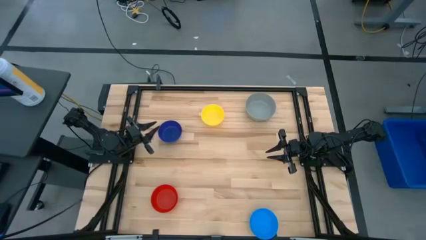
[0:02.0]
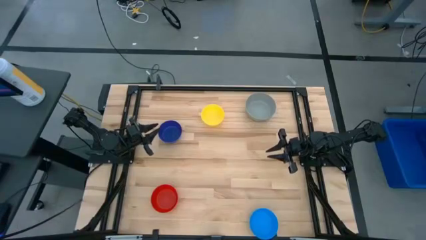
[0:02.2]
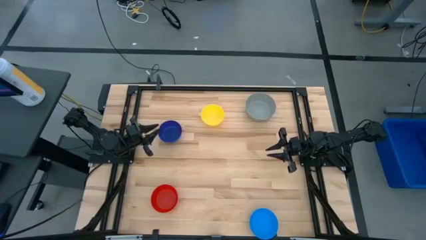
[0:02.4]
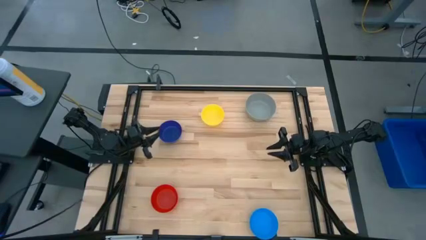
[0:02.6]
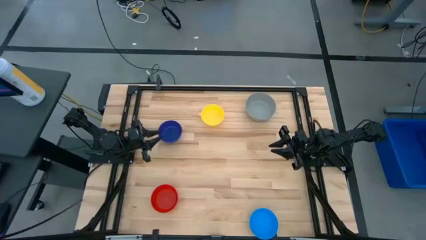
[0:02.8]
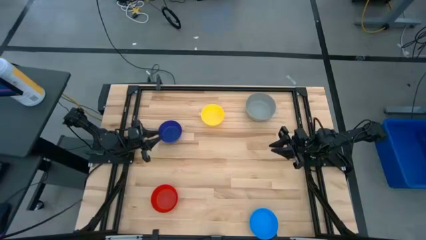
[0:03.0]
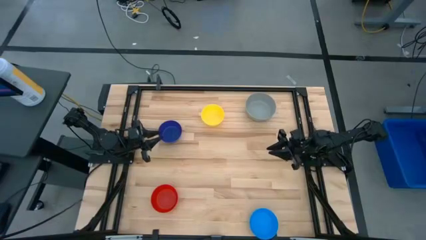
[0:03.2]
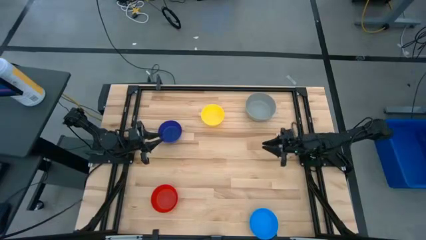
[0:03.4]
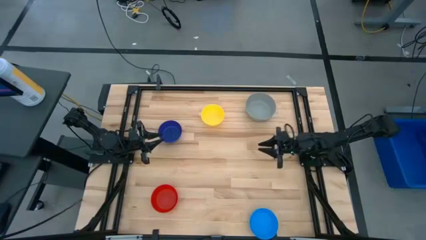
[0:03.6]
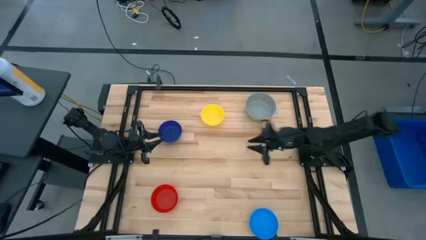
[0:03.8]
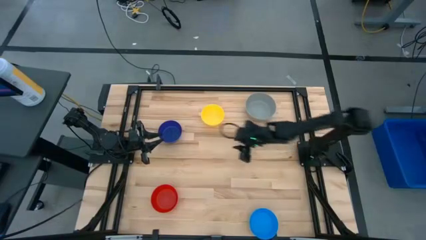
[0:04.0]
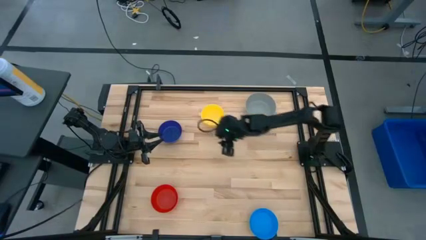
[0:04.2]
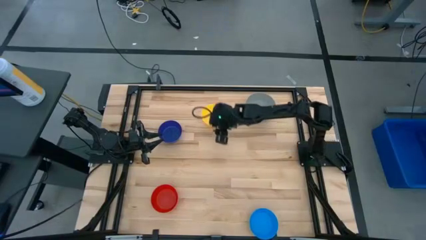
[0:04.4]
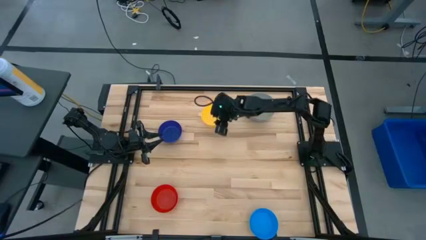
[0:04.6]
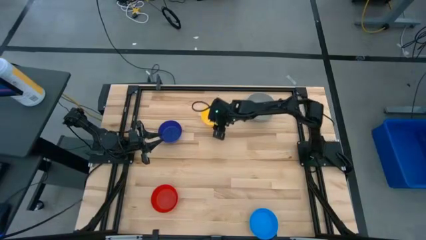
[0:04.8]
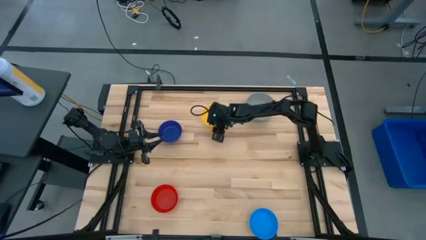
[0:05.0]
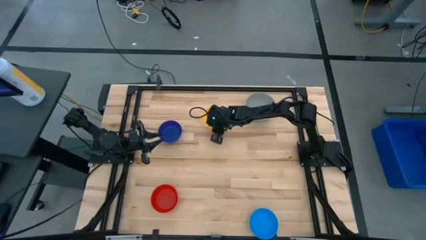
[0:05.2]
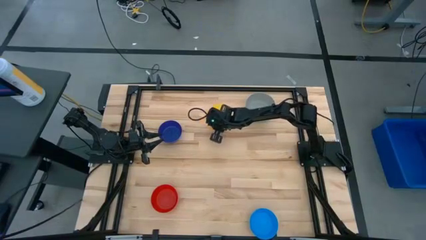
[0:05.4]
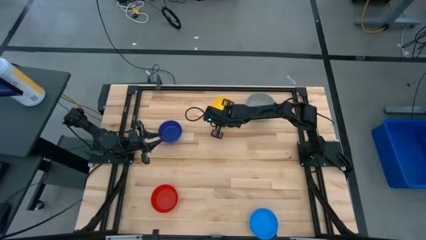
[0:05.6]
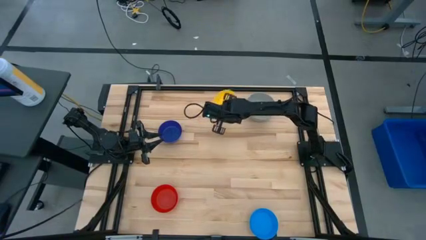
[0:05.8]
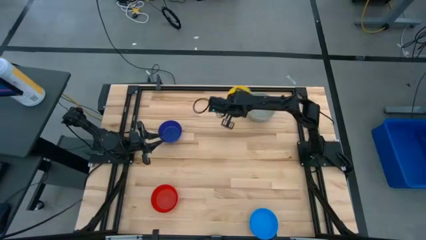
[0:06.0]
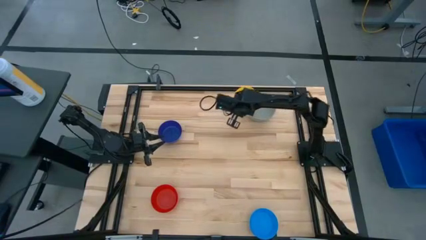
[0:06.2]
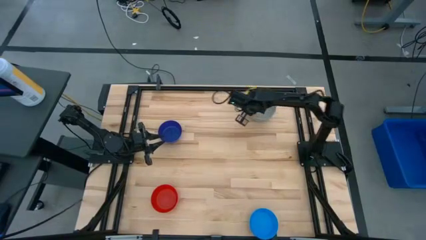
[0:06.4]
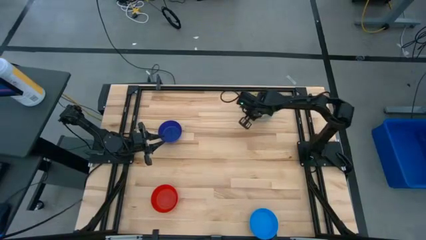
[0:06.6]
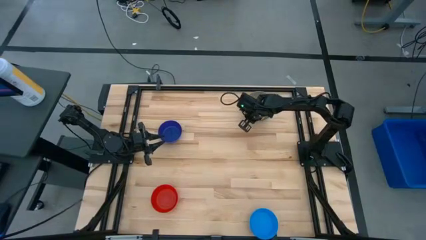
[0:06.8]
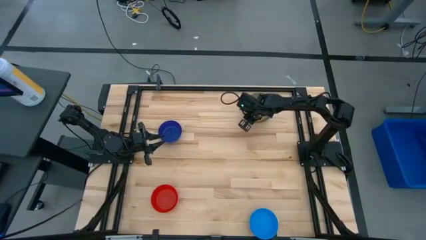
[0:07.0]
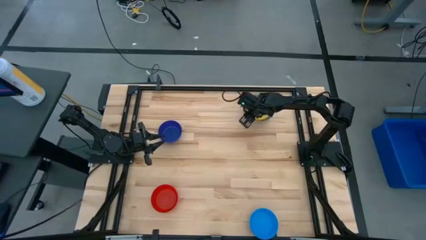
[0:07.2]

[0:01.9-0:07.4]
Stack the yellow bowl on the gray bowl

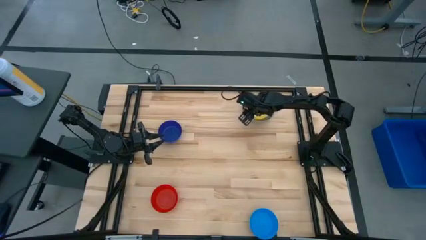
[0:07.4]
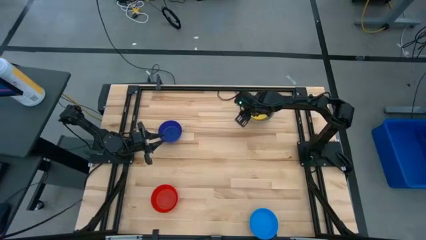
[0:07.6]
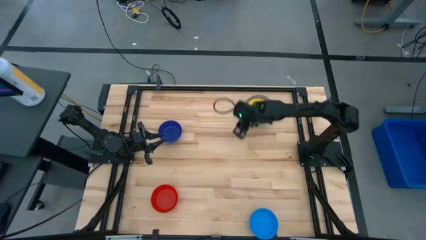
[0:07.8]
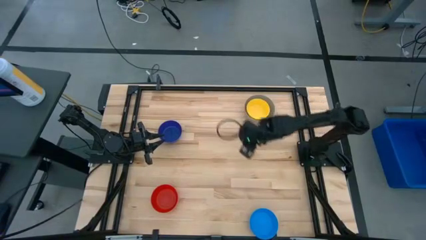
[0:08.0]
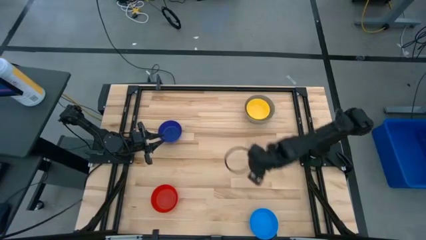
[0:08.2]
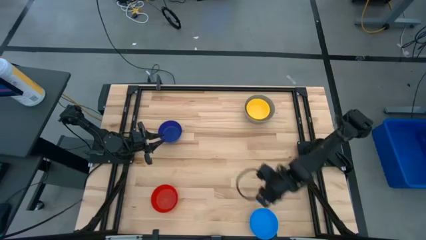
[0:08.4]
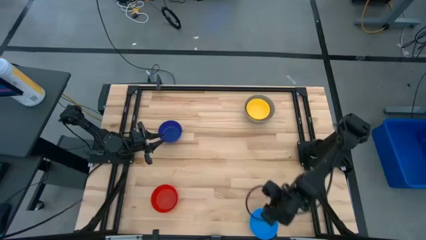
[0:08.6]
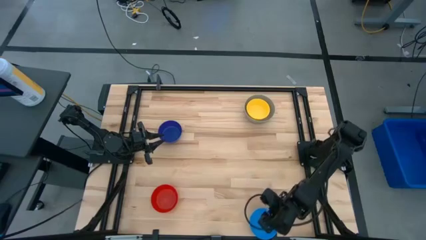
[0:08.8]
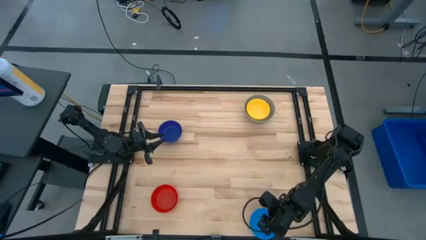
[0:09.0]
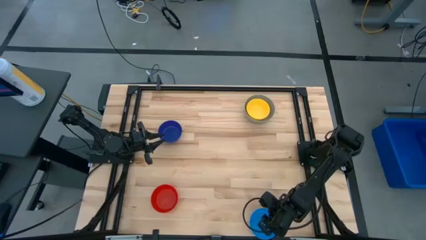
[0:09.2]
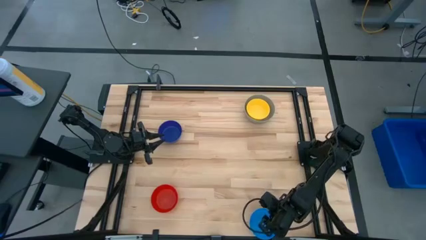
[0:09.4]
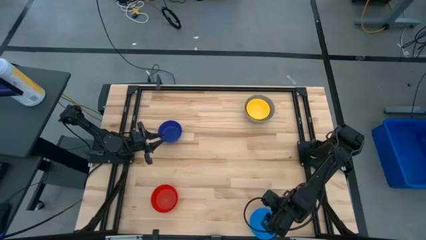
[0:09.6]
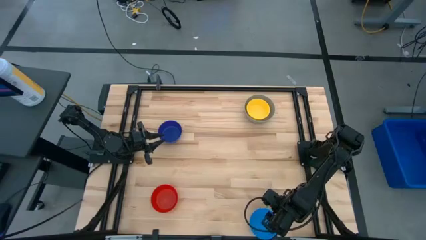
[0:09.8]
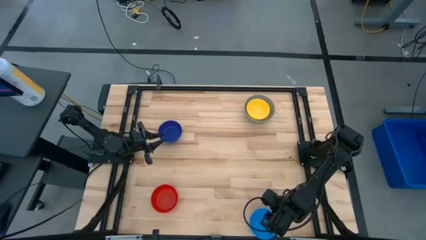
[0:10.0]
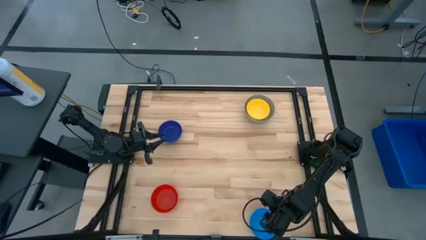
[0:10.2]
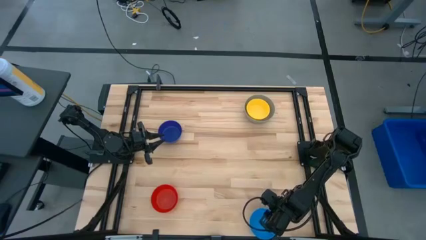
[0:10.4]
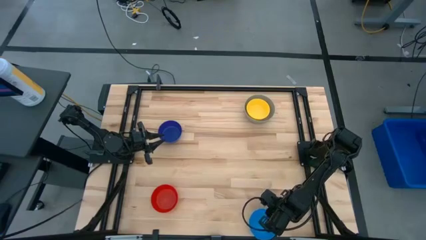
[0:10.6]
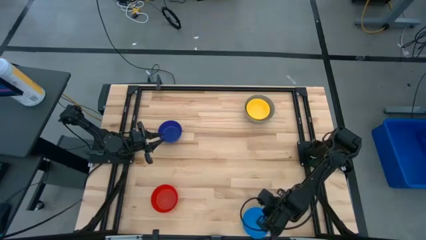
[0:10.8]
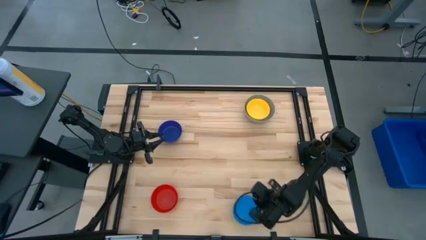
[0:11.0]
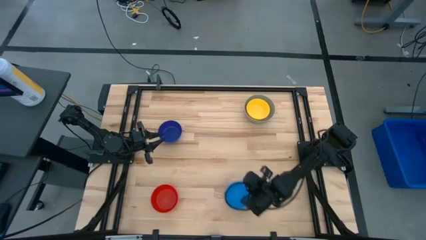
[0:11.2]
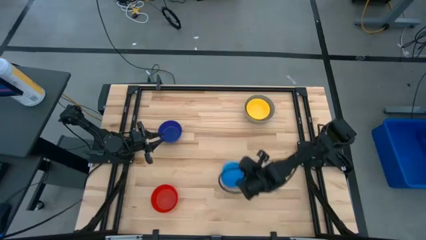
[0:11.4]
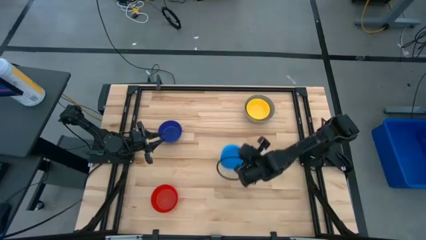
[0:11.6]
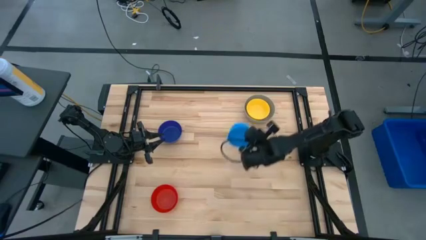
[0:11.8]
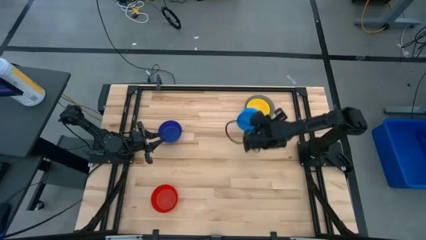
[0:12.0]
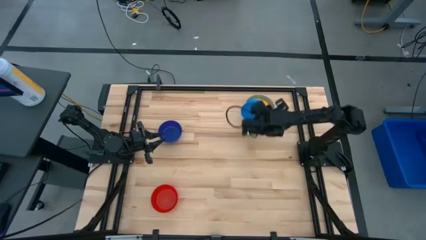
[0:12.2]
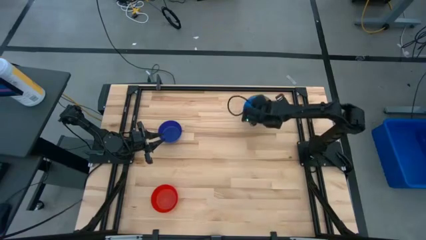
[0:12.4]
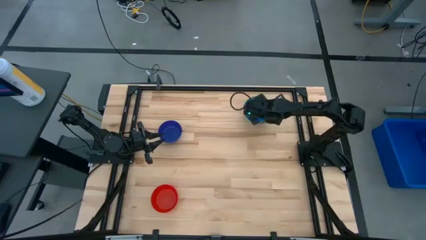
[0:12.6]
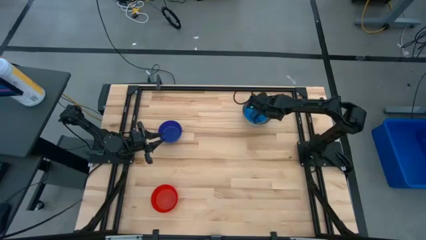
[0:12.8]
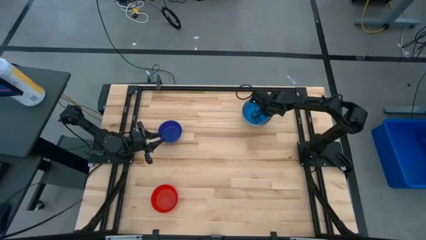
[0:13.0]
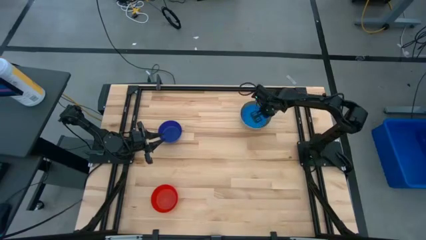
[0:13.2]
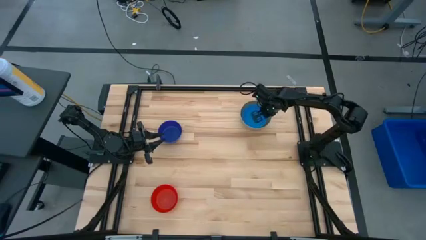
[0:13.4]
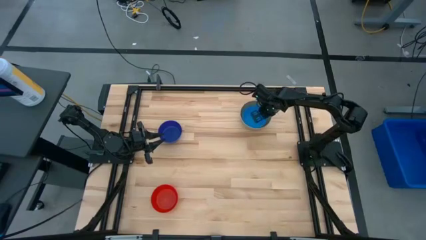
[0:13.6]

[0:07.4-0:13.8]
Stack the light blue bowl on the yellow bowl

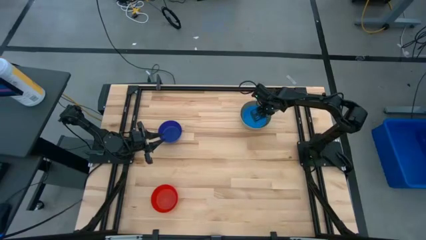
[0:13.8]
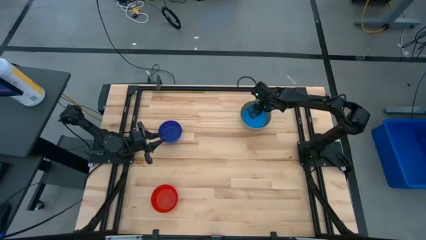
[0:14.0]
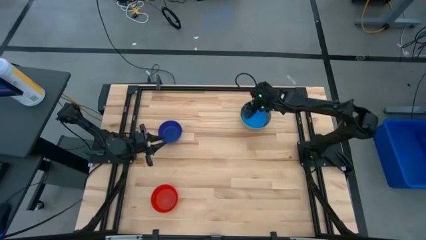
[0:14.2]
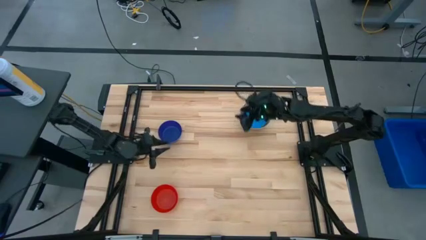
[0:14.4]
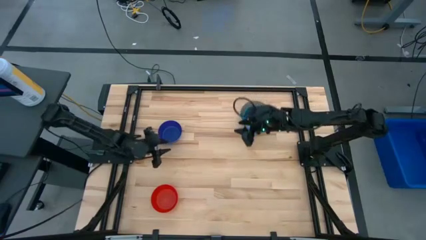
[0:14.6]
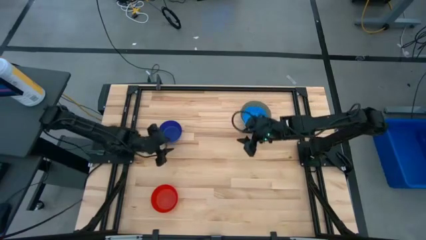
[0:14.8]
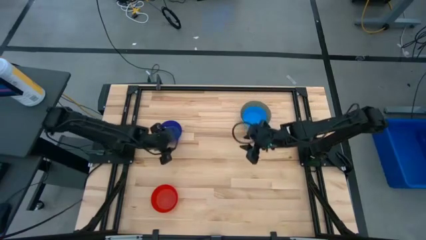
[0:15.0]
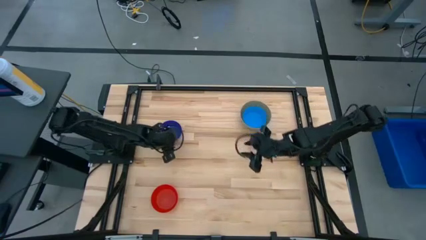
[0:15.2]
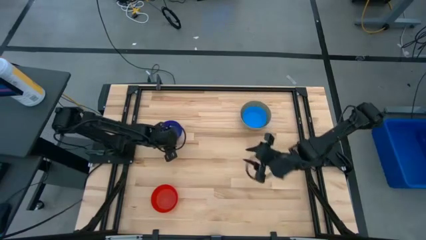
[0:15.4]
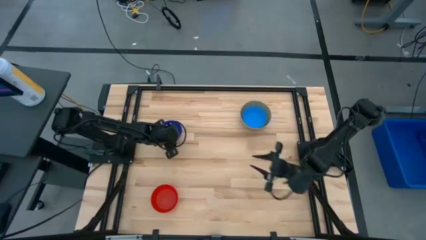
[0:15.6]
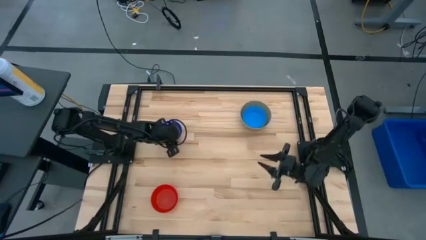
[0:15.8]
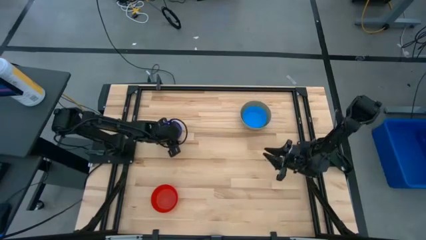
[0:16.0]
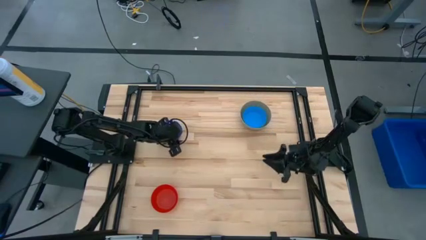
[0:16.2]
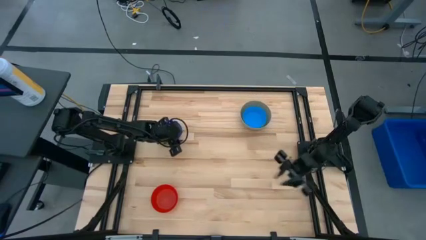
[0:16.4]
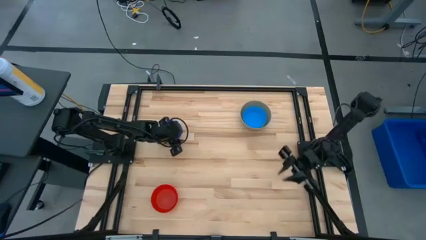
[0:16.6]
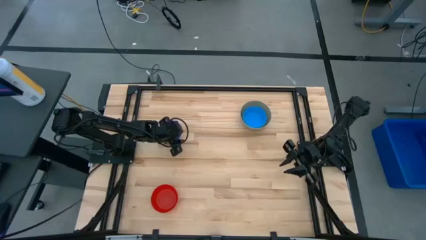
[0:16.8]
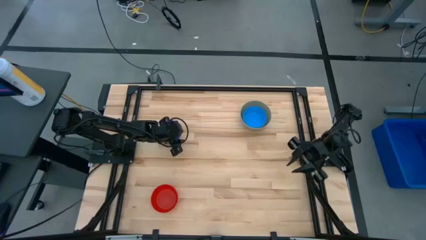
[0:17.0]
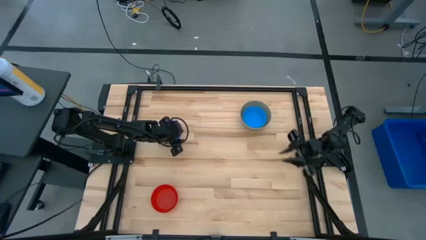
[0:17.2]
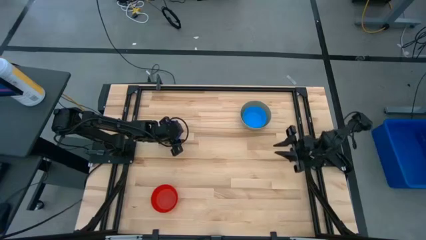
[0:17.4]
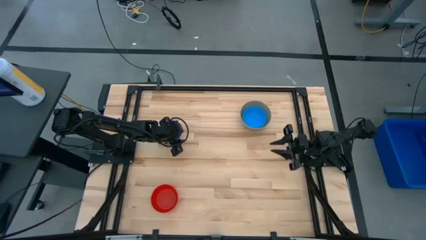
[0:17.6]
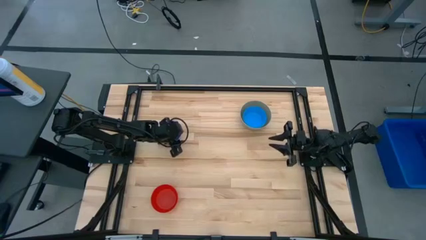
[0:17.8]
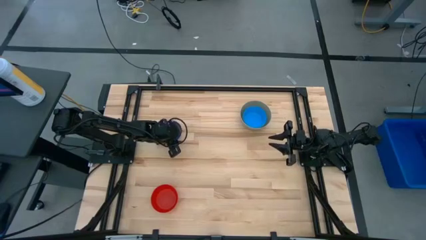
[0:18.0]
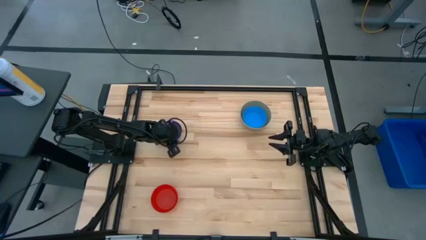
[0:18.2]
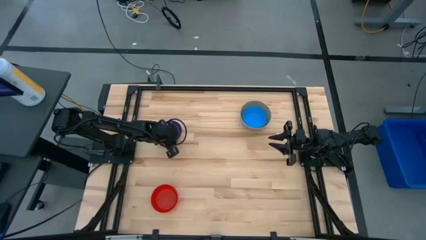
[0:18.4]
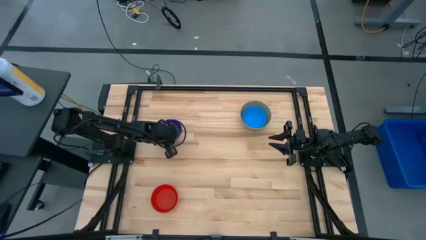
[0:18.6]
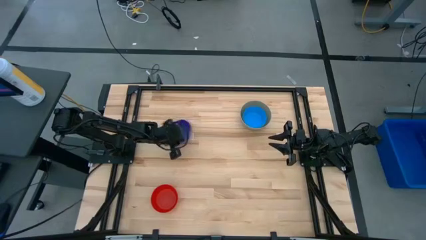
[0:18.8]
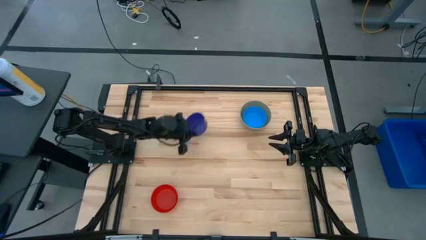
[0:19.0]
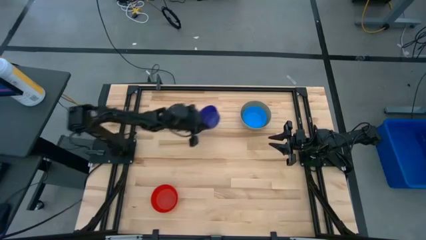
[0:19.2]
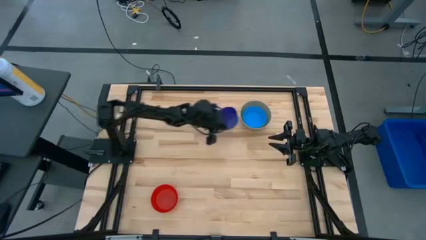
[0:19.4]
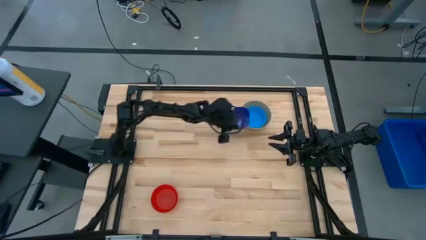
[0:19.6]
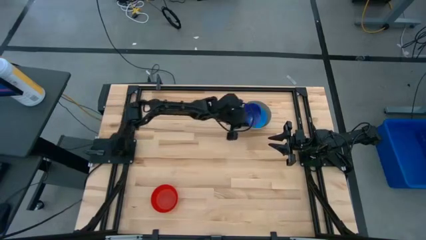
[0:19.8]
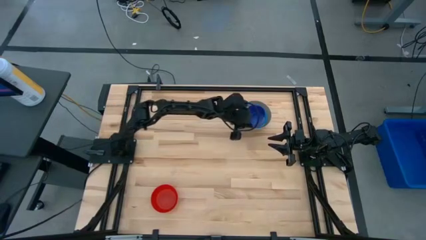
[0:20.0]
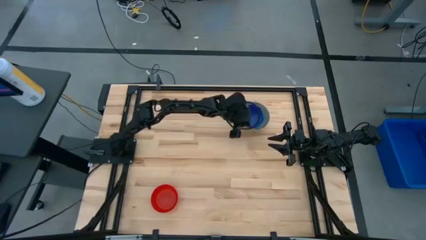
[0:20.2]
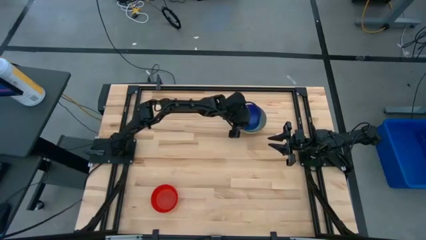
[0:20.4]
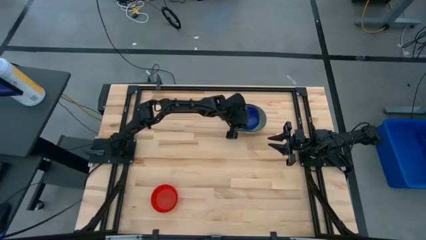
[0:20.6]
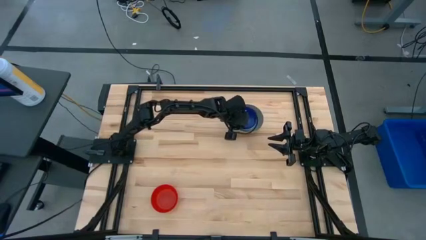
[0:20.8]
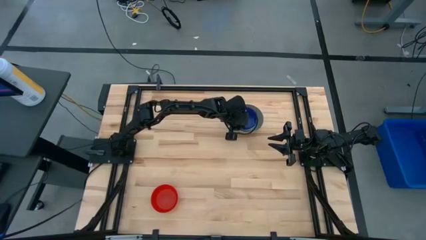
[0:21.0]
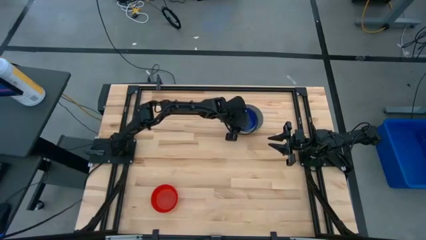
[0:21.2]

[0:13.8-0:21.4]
Stack the blue bowl on the light blue bowl
